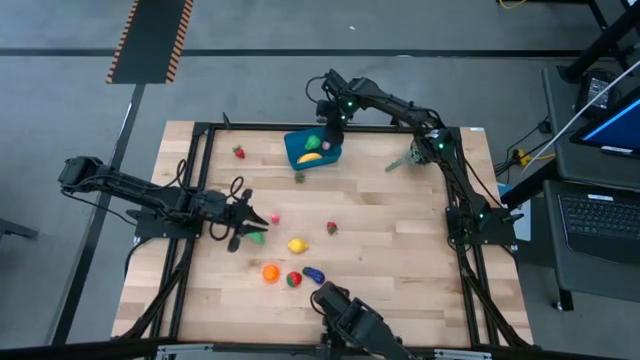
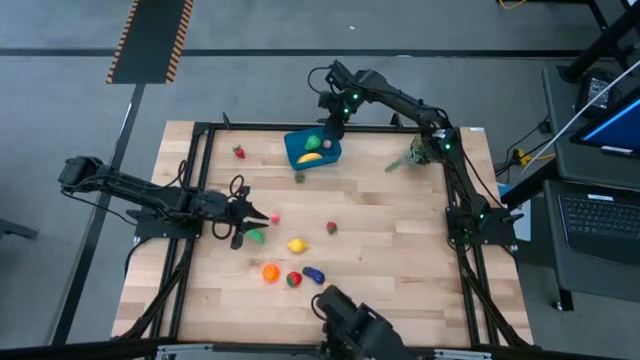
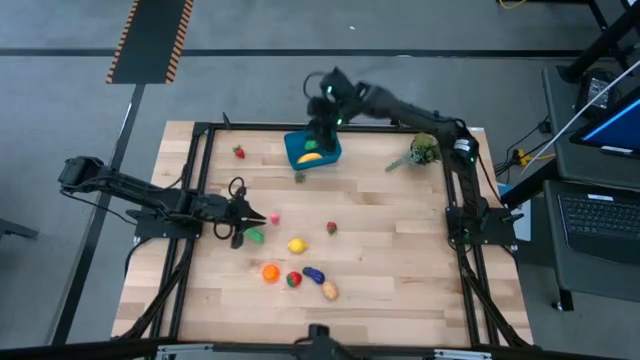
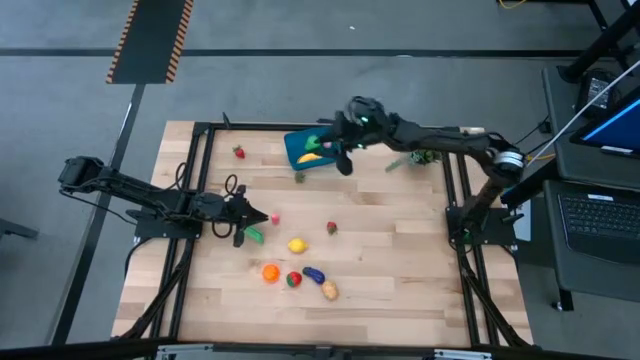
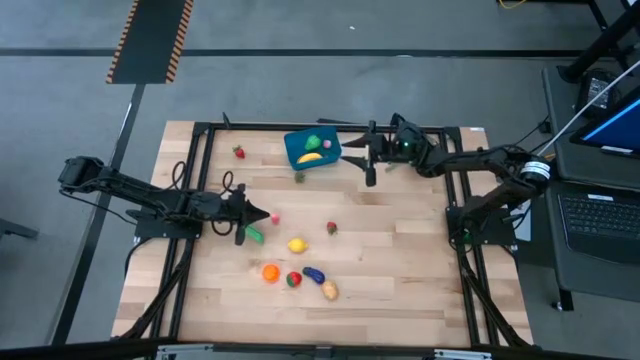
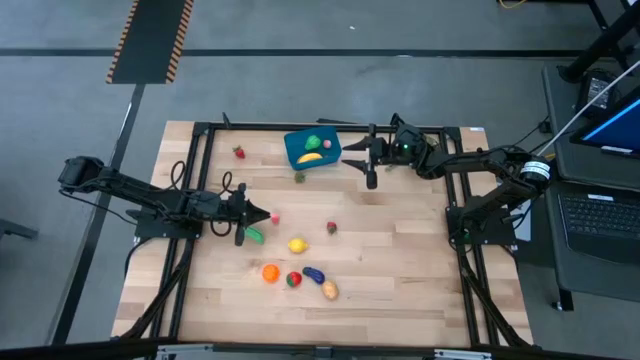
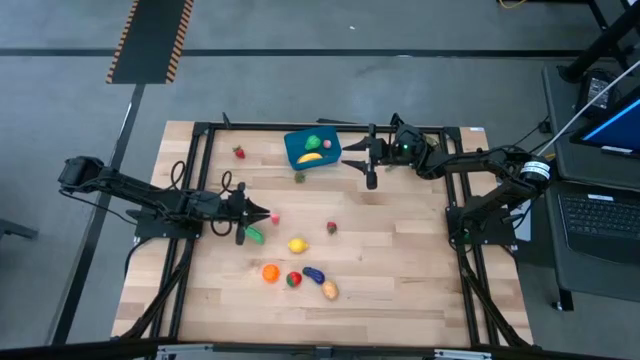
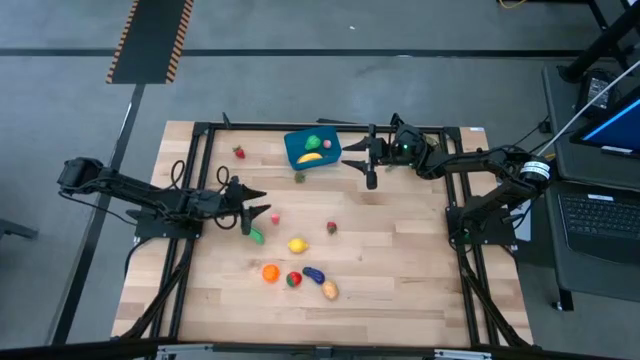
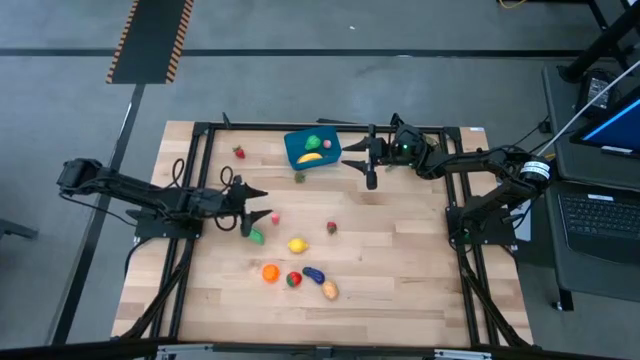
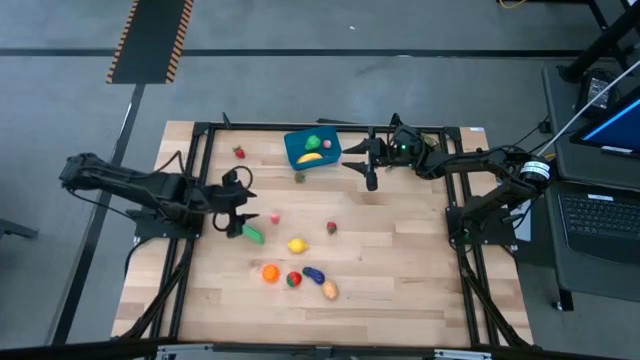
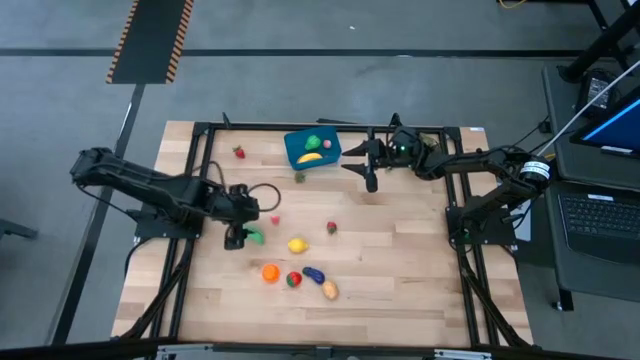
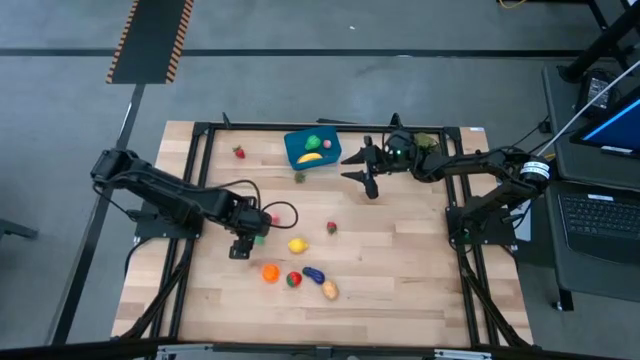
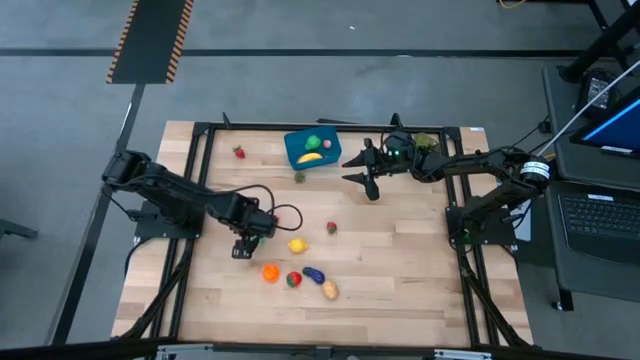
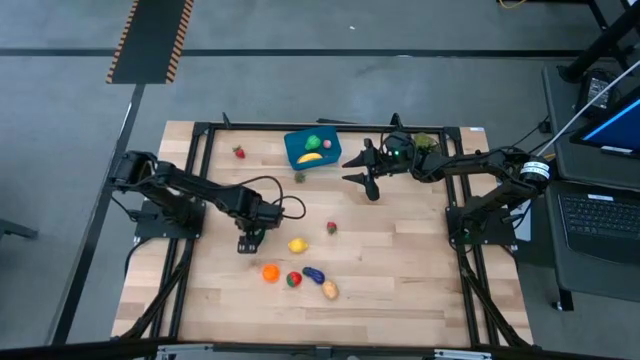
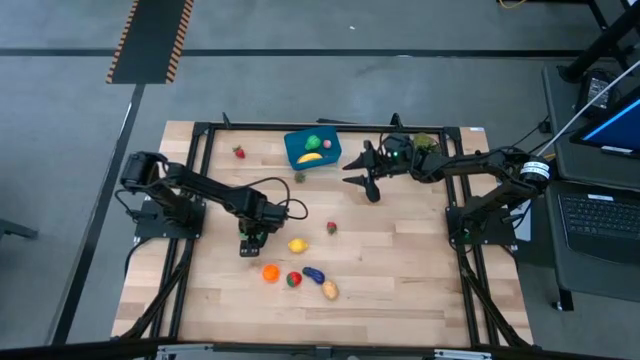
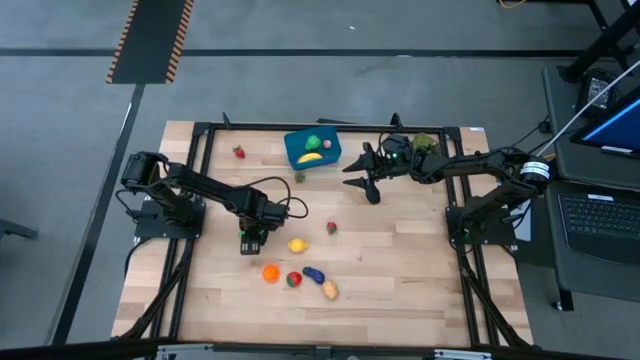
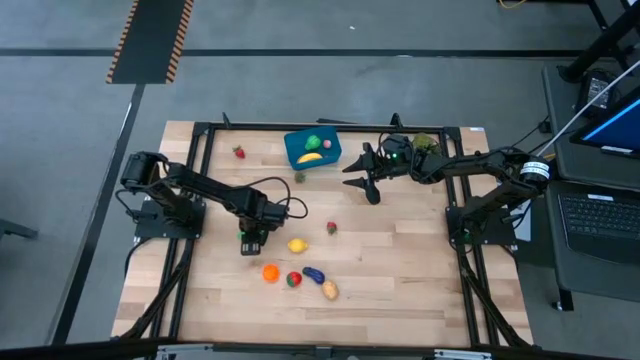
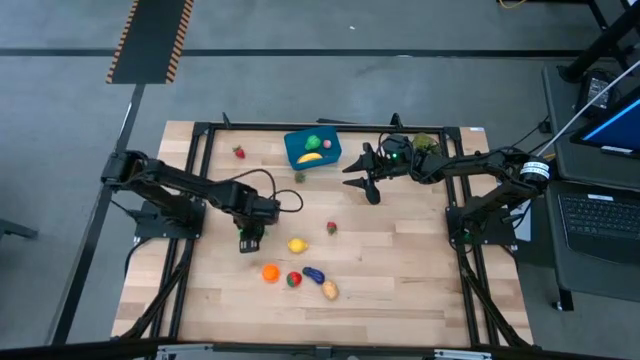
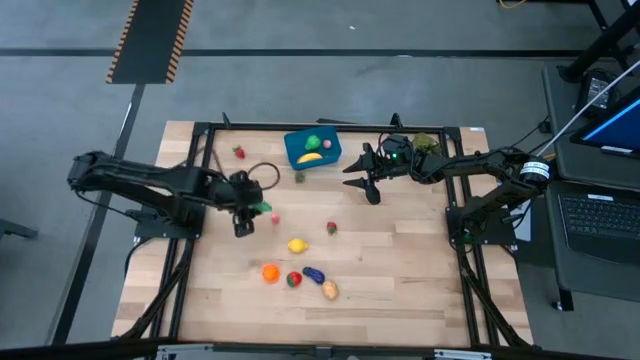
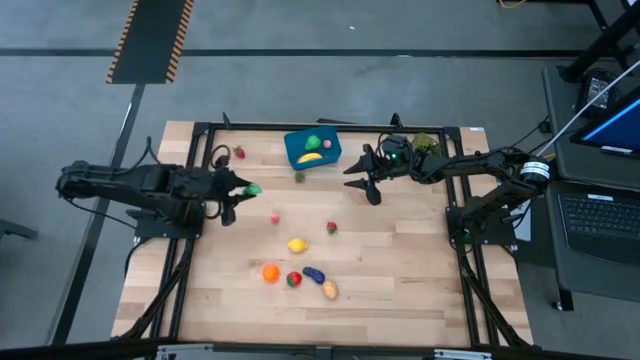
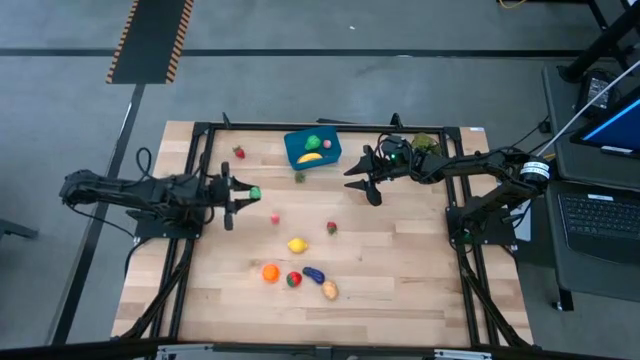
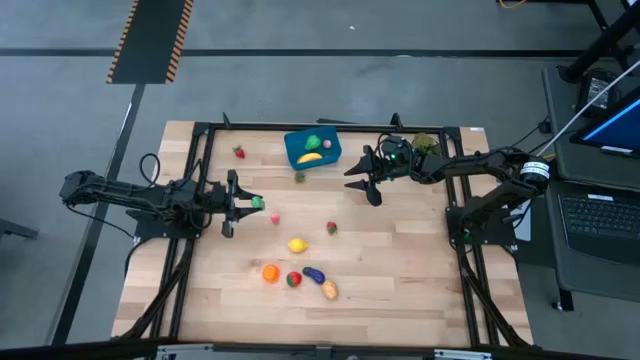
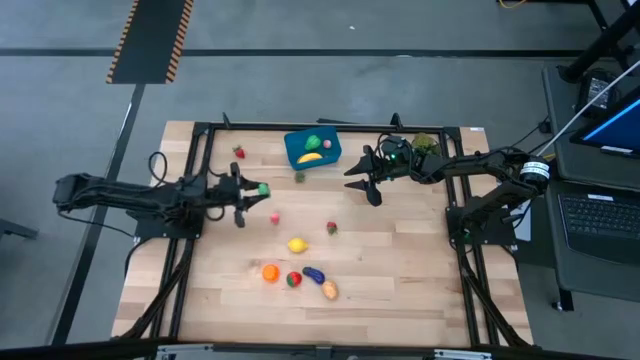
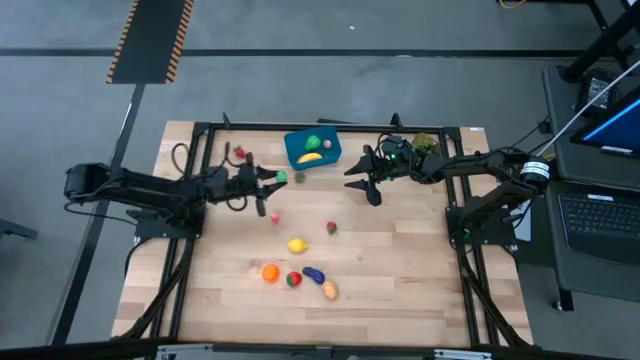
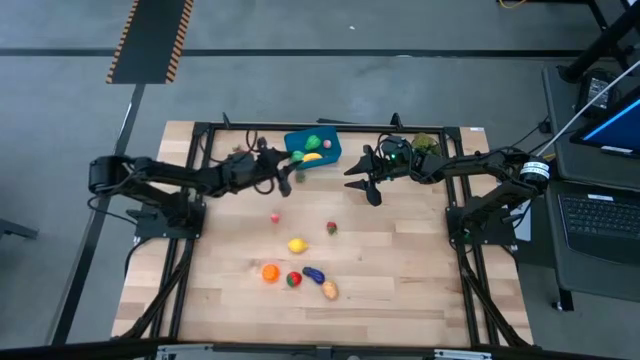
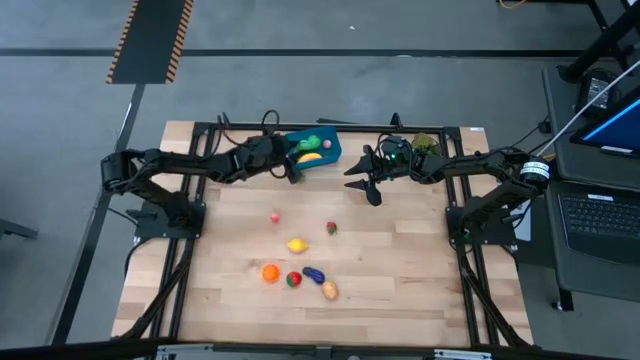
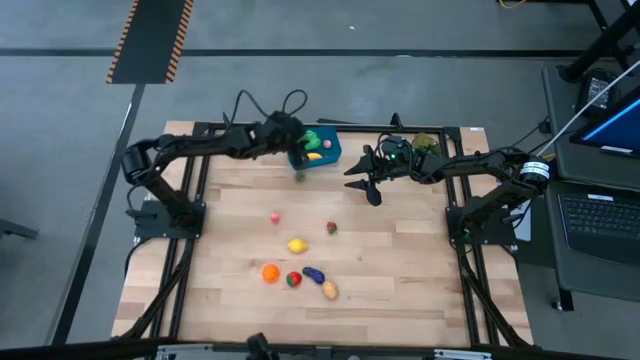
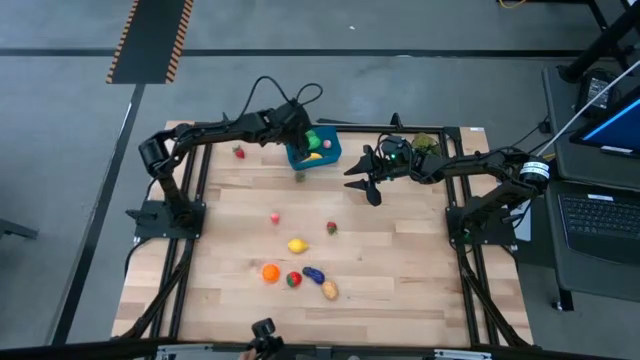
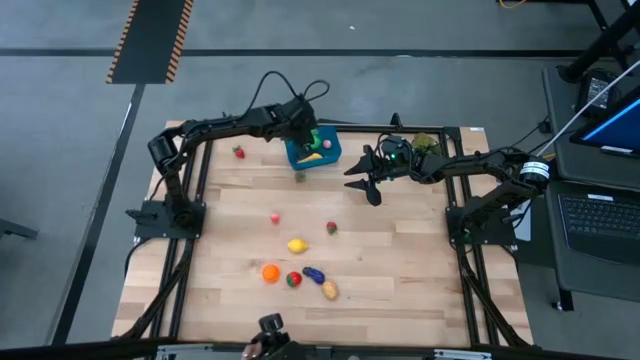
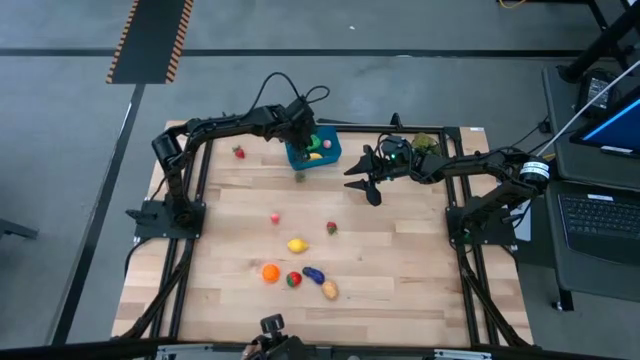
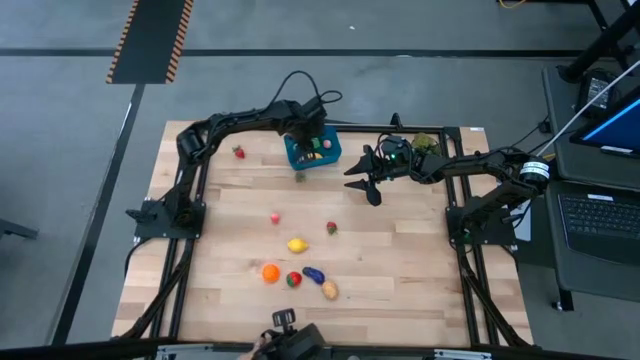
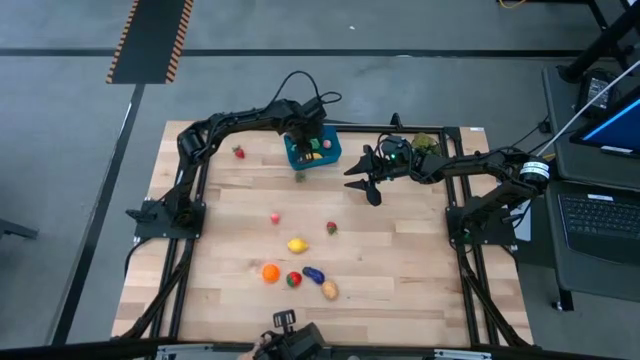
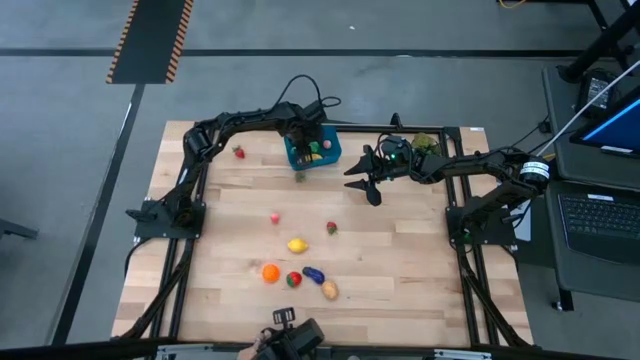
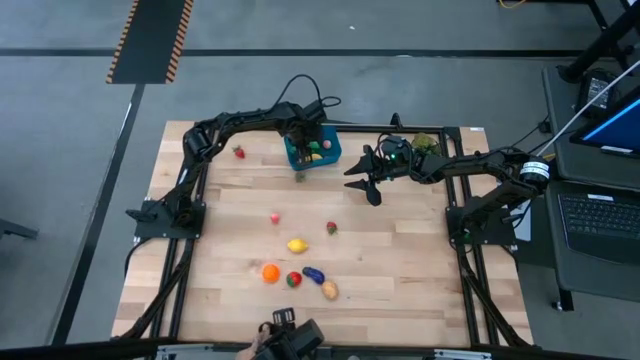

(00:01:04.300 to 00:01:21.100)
Task: Pick and placing Produce into tupperware
Put the pea pod into the blue bin

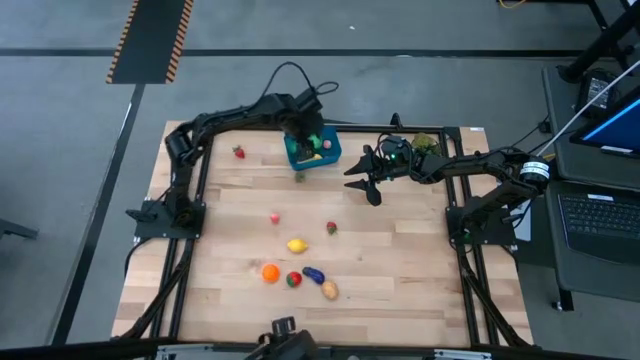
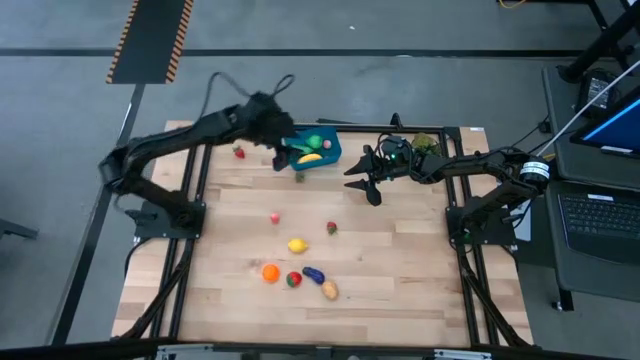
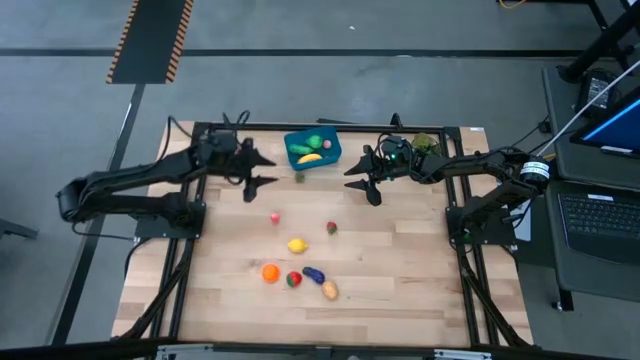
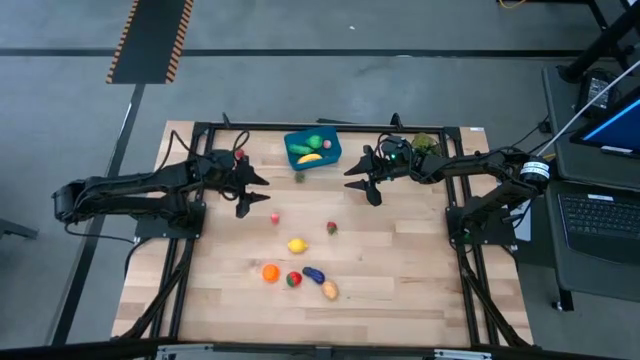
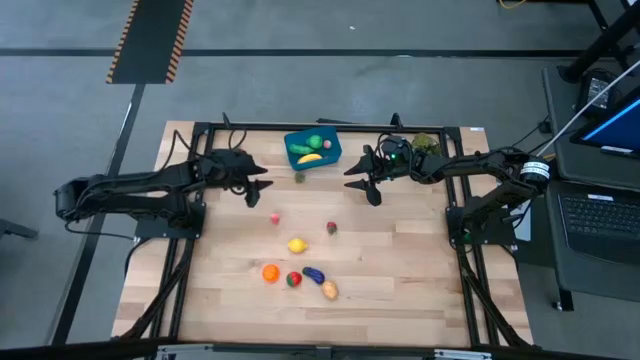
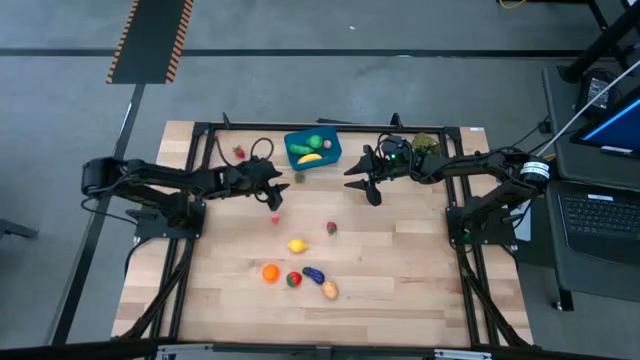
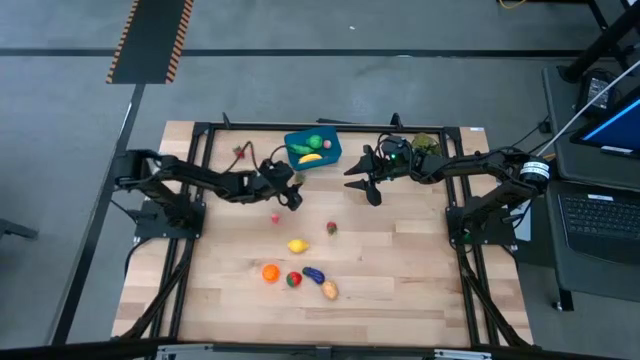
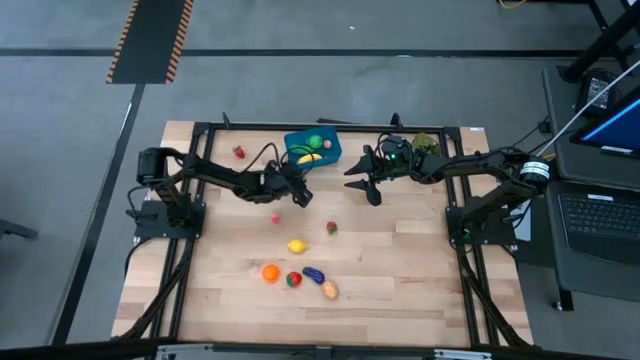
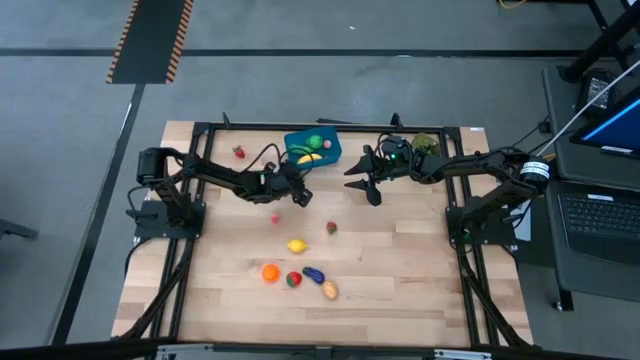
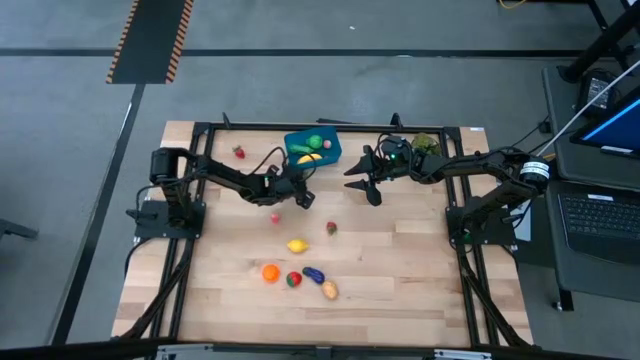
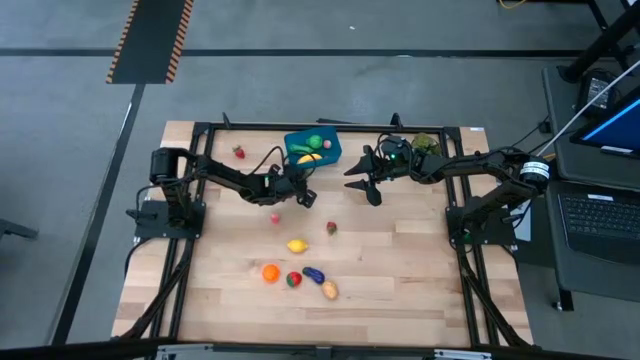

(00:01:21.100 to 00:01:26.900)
Put the strawberry into the blue bin
